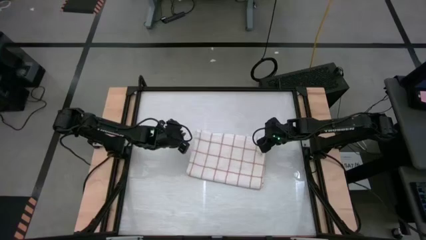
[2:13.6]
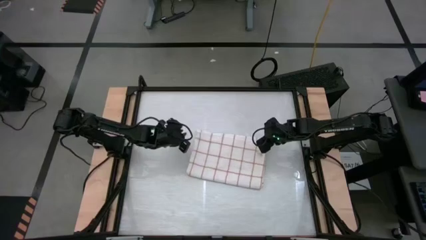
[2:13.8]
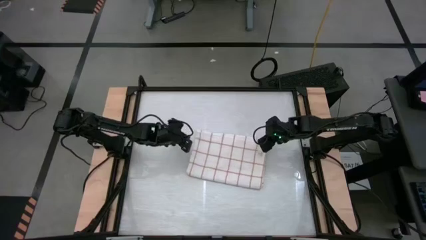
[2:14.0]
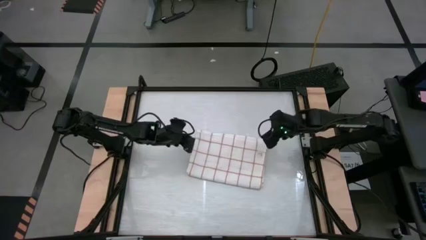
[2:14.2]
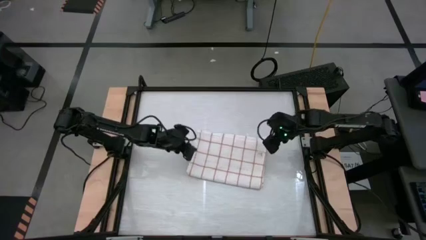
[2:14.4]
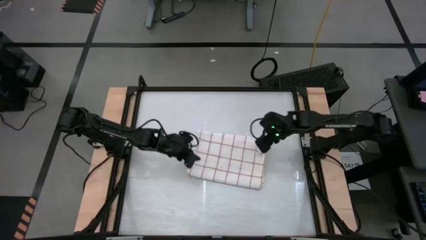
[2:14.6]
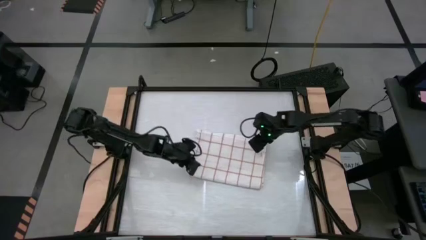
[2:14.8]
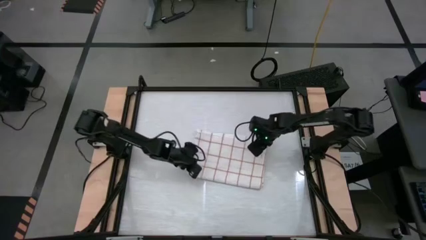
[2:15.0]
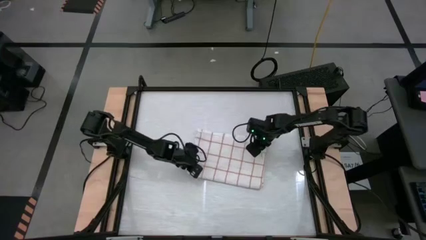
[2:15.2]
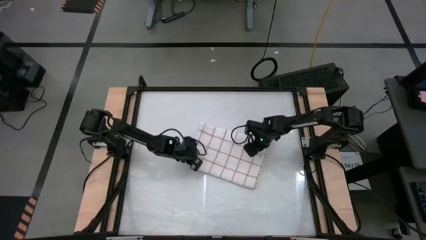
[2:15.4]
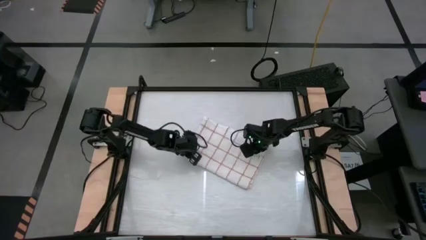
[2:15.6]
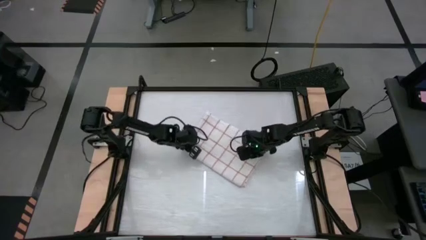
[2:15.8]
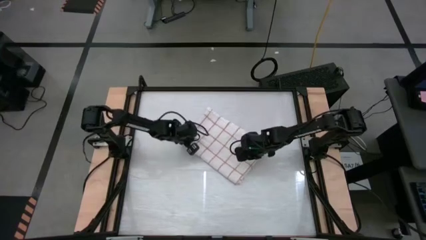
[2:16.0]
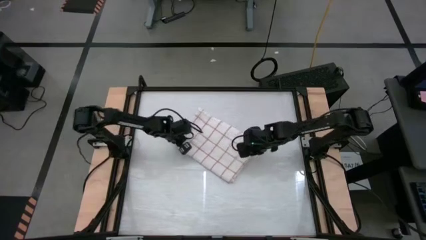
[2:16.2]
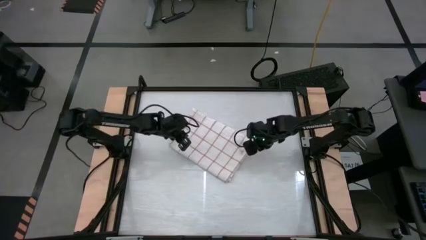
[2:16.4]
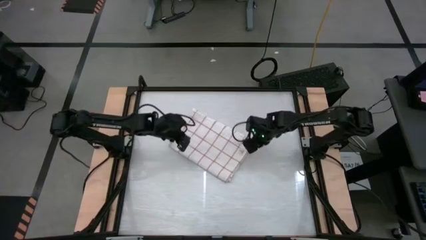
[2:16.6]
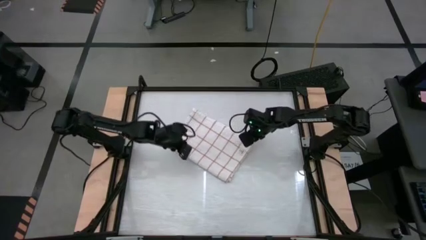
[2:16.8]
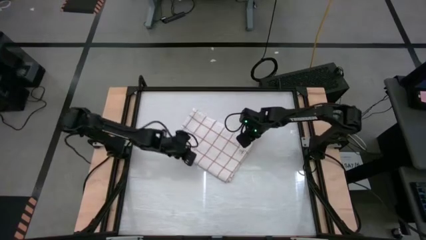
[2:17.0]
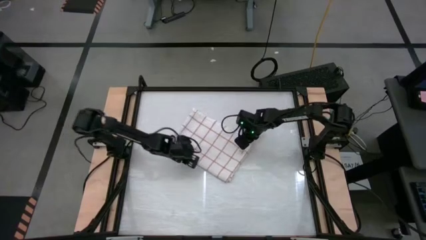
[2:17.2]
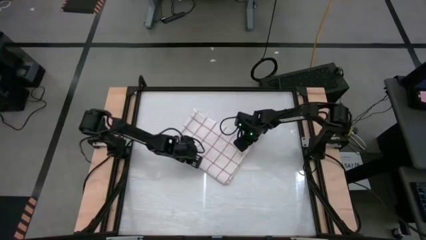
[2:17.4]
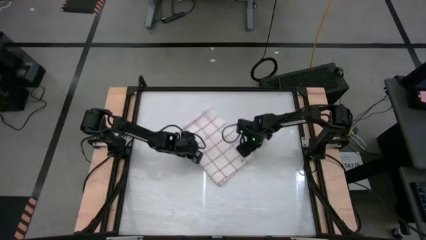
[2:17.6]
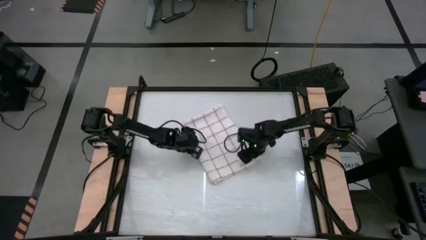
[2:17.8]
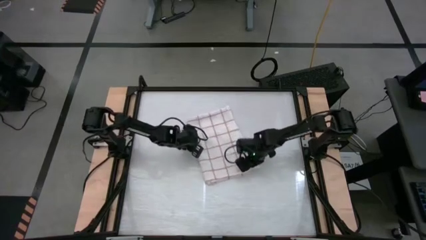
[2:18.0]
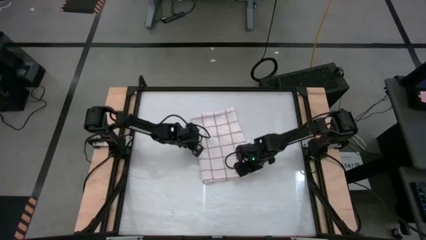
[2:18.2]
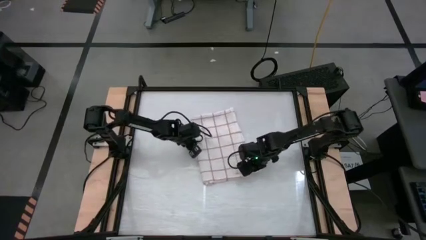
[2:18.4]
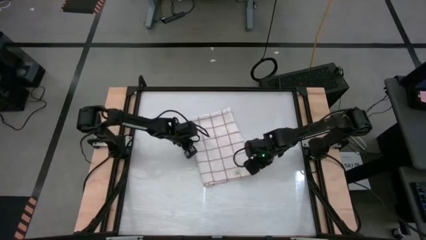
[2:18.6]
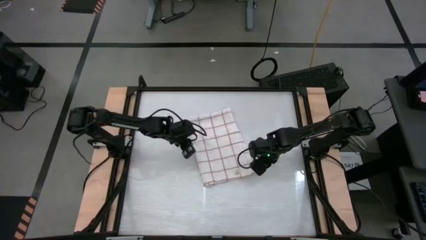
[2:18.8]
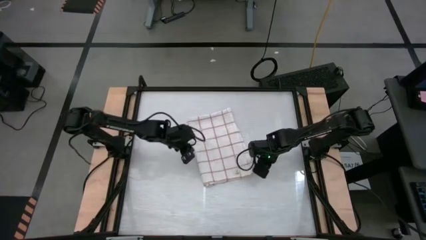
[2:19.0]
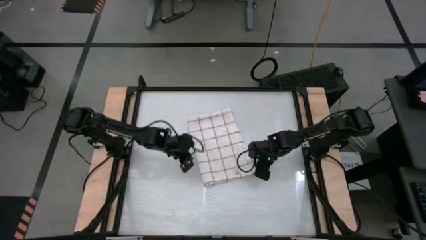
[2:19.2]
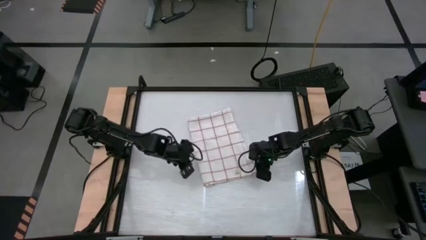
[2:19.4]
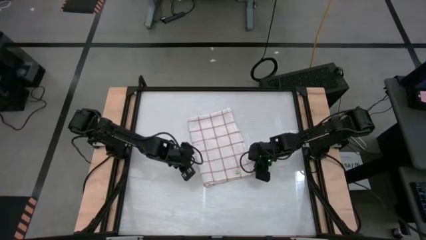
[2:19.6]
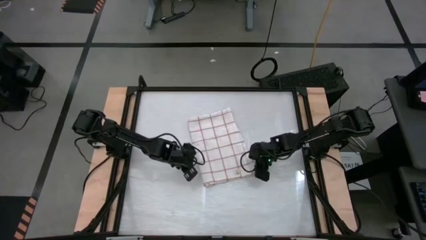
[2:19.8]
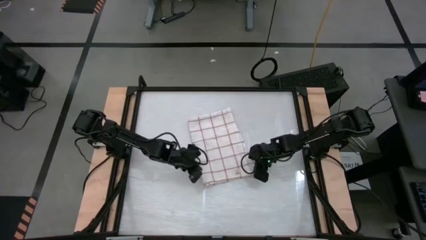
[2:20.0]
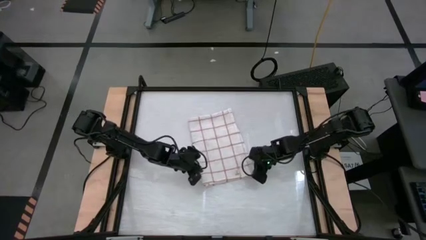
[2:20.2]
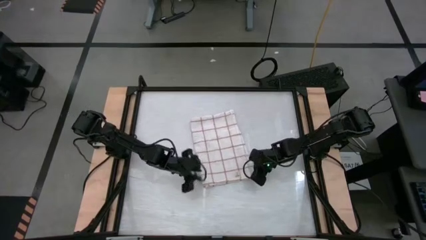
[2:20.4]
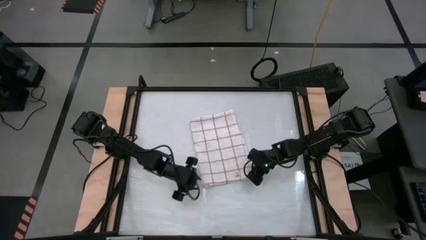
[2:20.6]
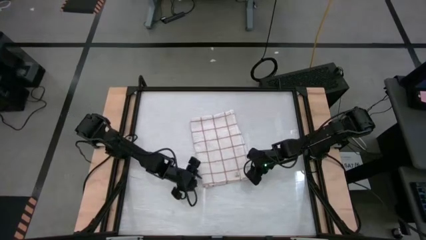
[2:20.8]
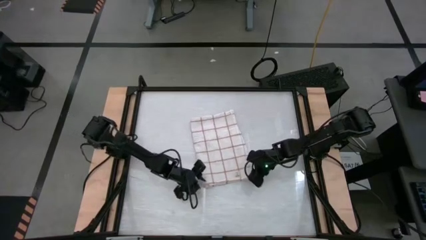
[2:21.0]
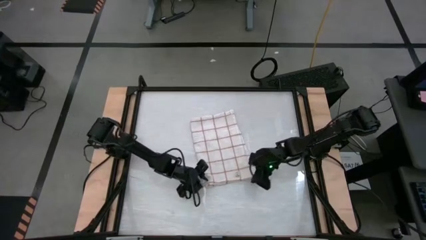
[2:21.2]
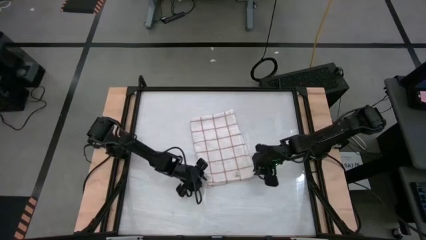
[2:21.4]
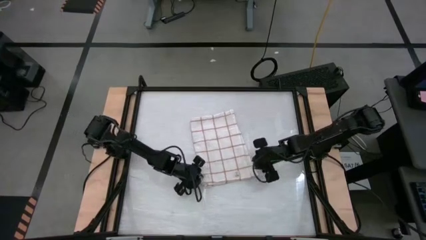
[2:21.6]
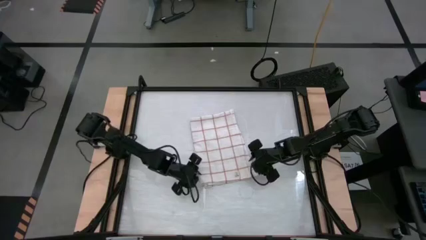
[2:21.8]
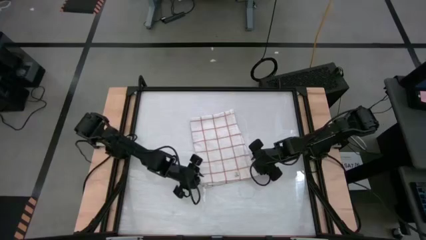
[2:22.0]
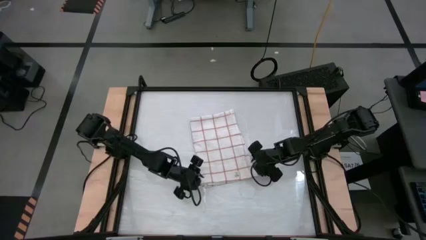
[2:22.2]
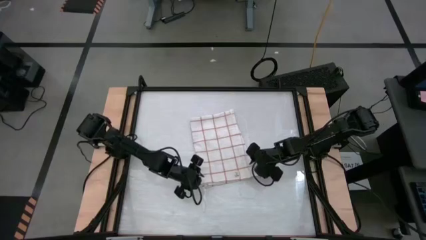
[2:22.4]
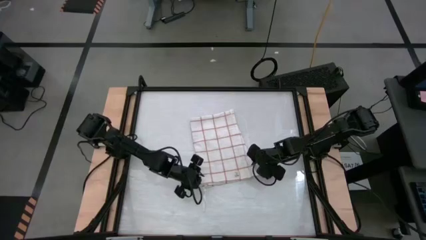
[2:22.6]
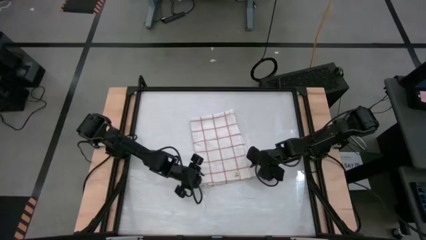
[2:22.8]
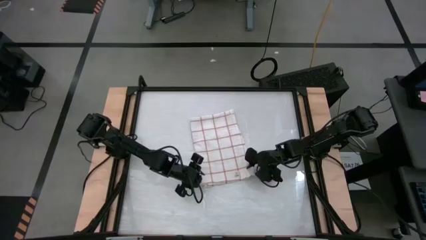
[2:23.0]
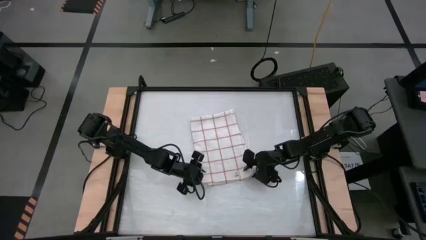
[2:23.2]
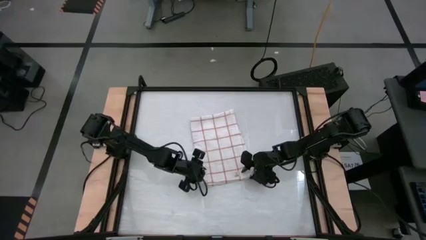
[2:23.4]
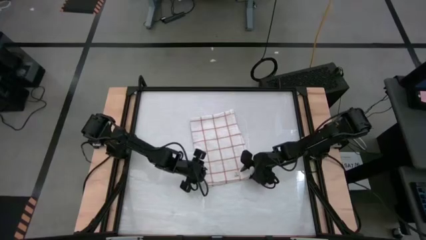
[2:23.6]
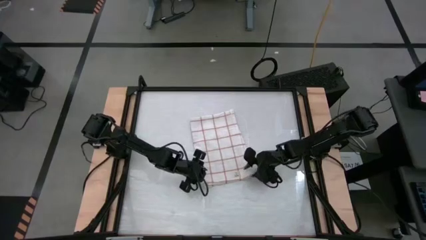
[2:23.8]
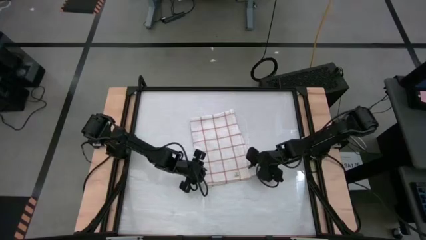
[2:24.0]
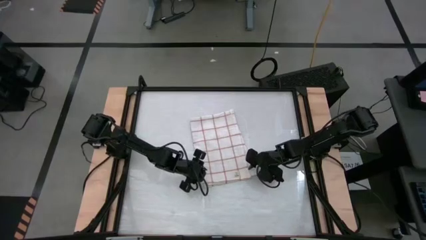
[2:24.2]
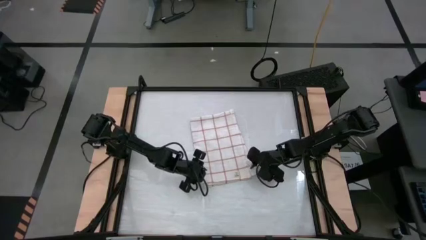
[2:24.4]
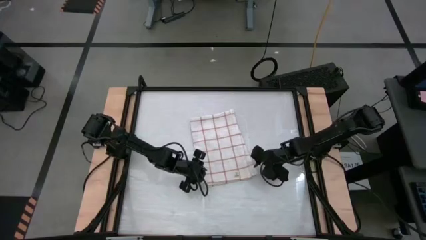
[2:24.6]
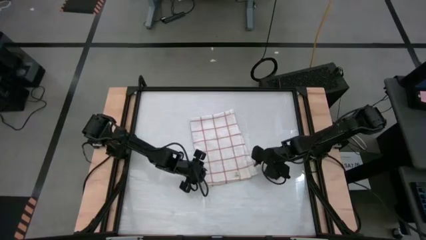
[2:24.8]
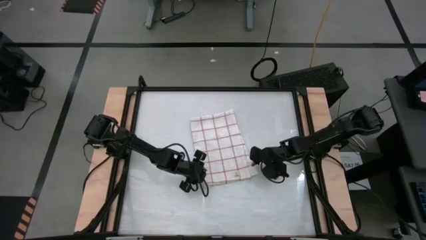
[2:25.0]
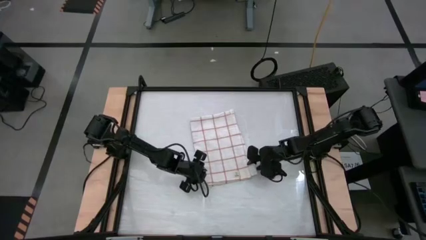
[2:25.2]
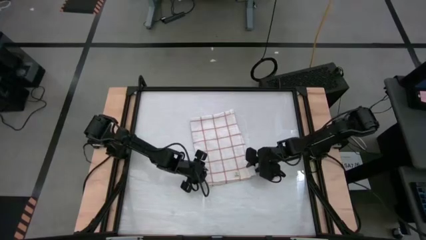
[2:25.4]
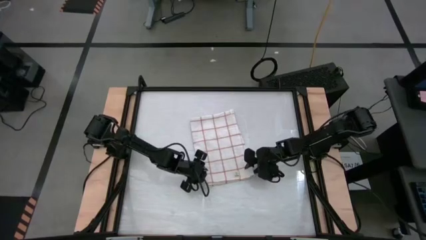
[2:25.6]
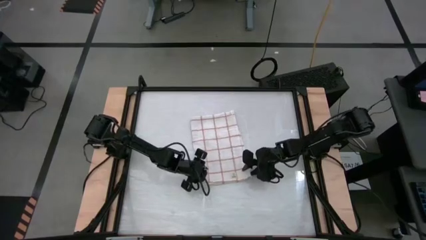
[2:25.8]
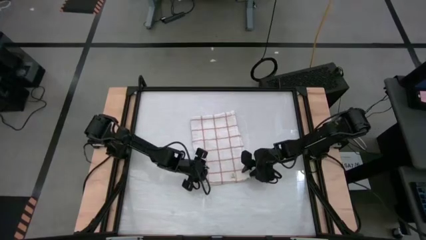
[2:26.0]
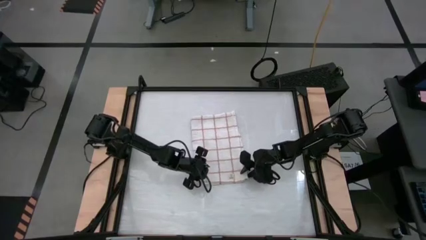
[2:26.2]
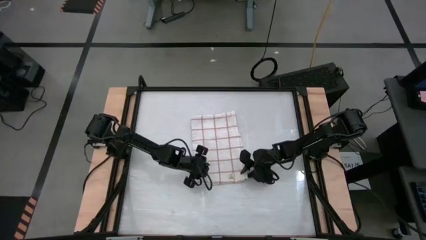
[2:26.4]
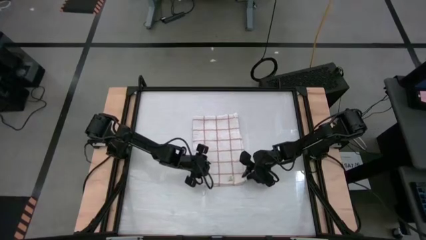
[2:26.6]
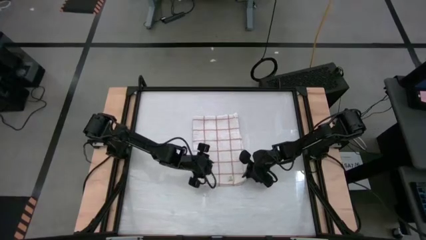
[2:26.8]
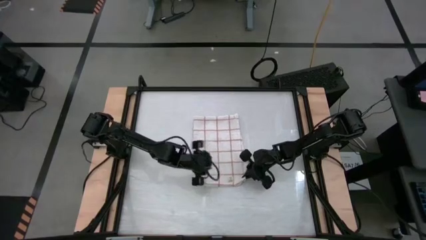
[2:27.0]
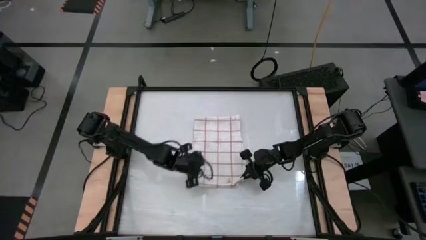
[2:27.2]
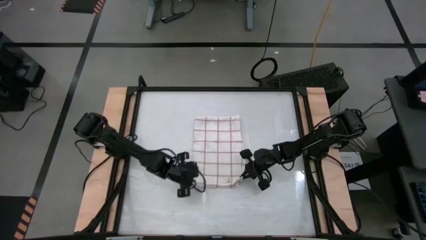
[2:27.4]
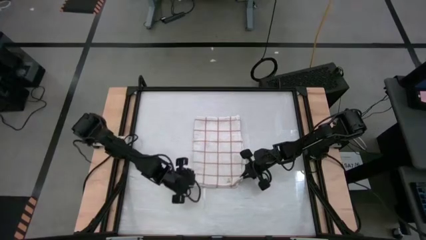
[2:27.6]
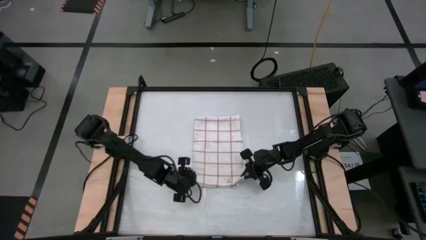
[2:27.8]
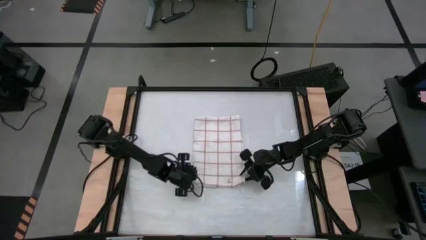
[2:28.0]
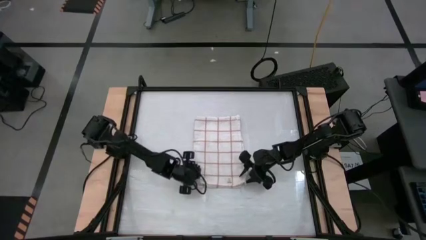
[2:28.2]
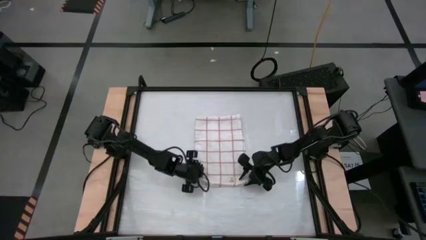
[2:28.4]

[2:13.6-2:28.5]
Task: Roll towel
Roll the white checkered towel
